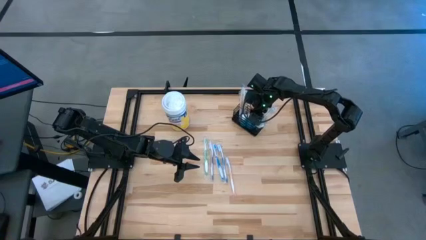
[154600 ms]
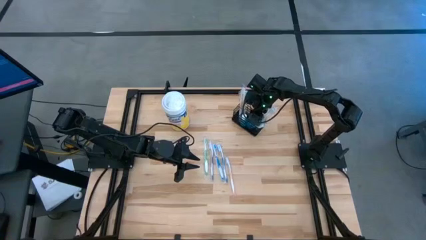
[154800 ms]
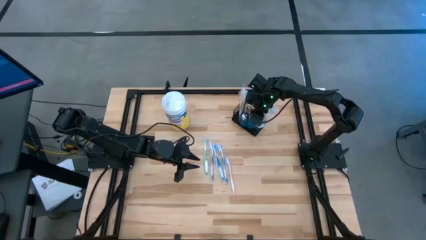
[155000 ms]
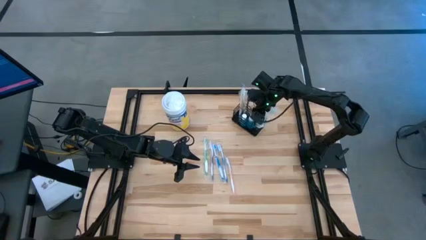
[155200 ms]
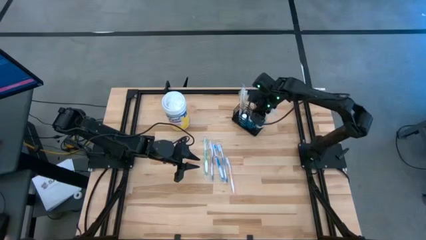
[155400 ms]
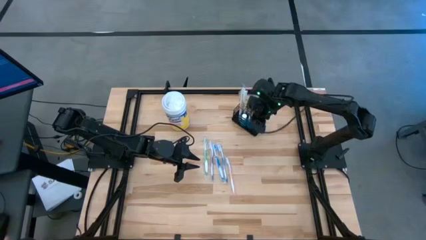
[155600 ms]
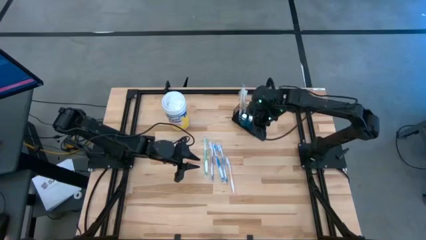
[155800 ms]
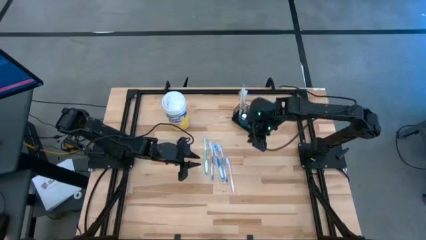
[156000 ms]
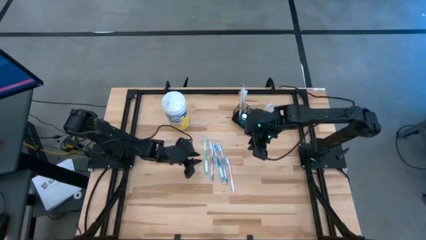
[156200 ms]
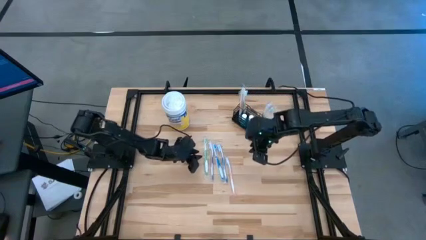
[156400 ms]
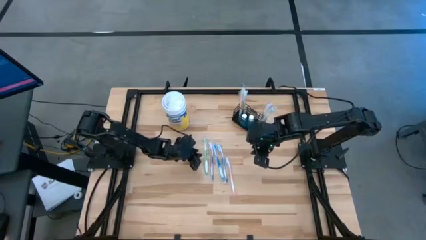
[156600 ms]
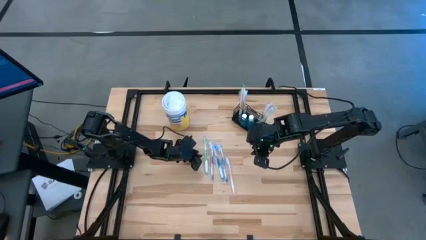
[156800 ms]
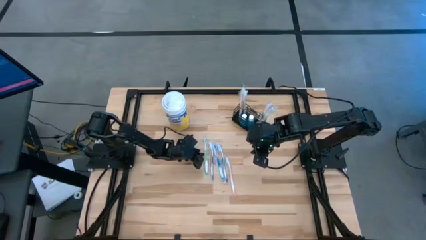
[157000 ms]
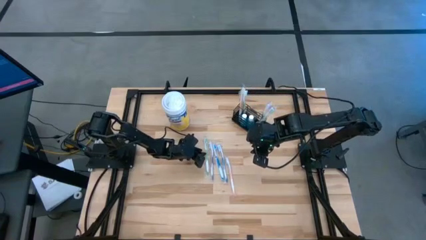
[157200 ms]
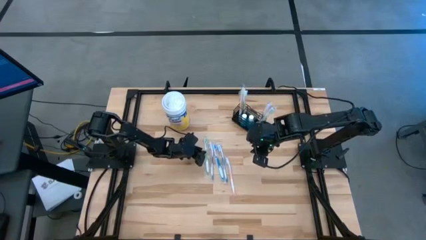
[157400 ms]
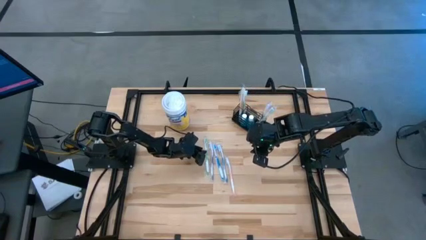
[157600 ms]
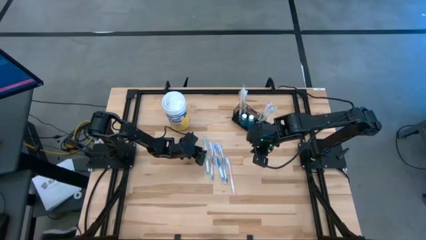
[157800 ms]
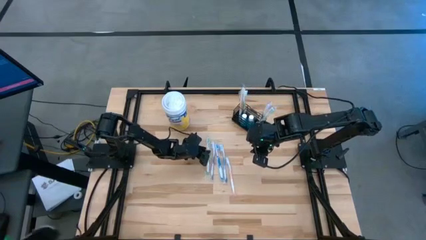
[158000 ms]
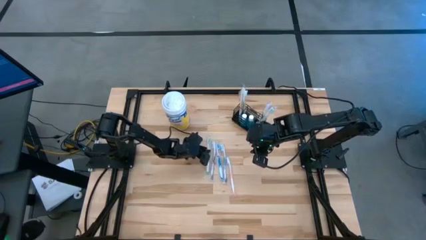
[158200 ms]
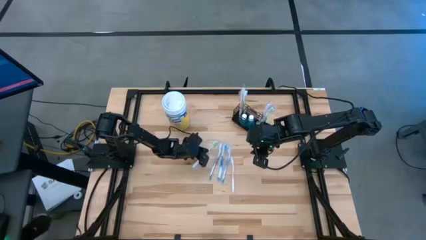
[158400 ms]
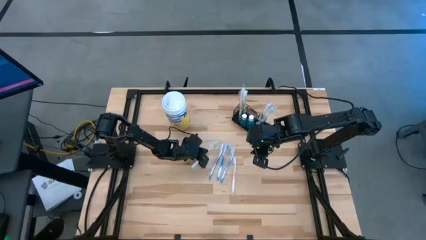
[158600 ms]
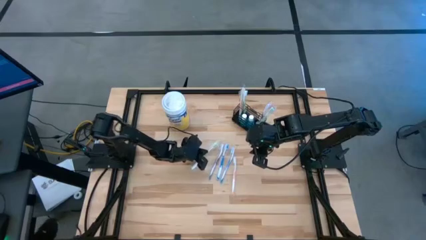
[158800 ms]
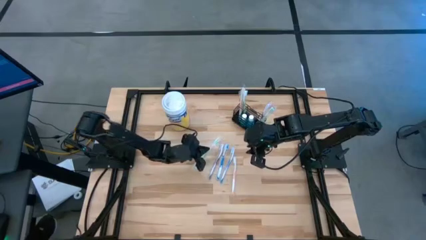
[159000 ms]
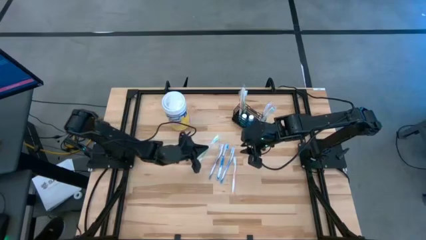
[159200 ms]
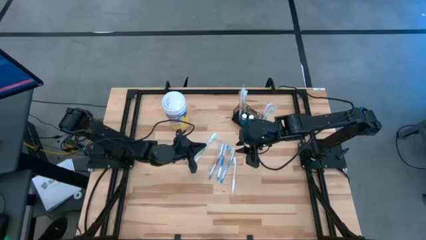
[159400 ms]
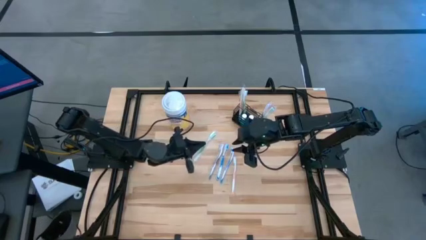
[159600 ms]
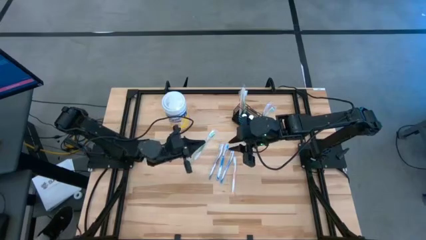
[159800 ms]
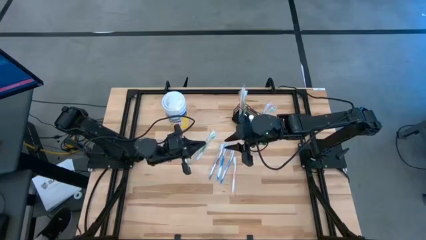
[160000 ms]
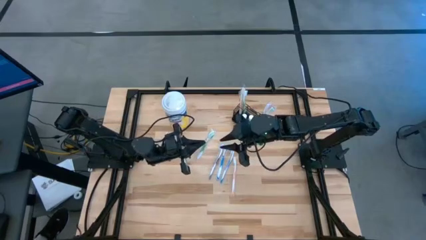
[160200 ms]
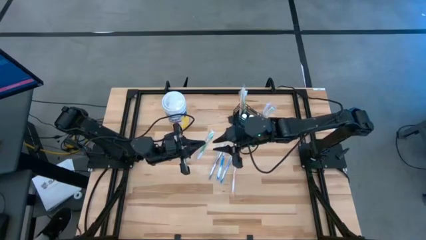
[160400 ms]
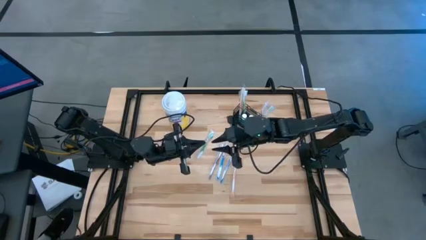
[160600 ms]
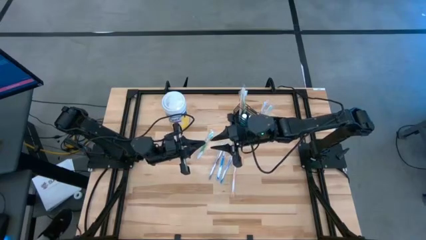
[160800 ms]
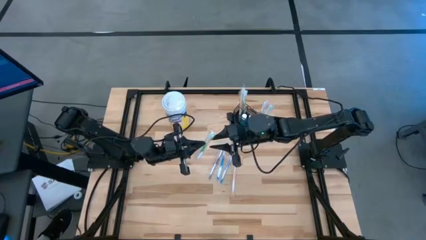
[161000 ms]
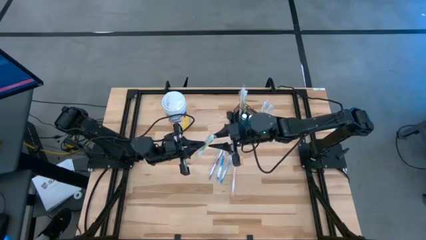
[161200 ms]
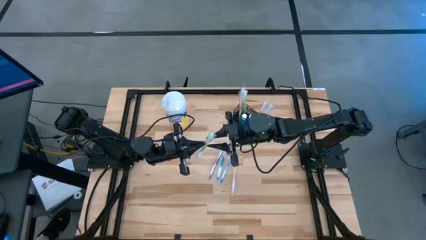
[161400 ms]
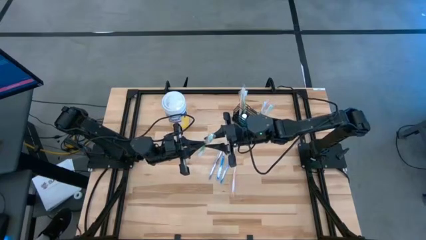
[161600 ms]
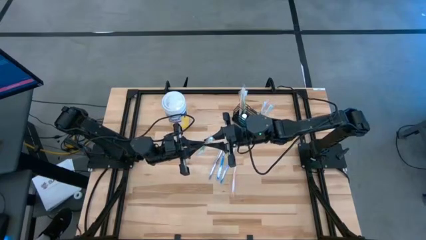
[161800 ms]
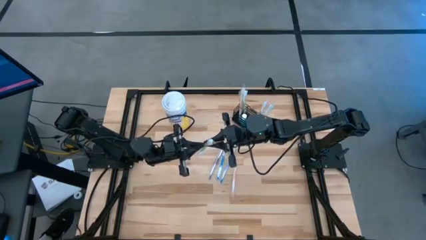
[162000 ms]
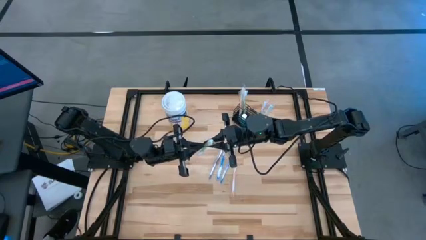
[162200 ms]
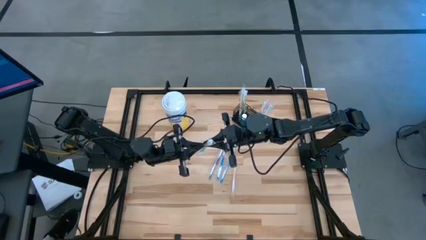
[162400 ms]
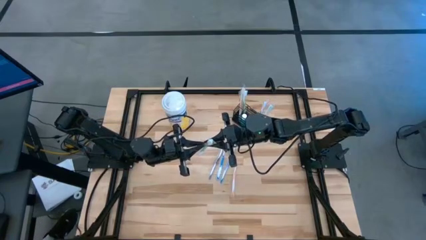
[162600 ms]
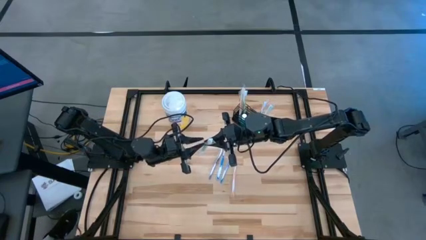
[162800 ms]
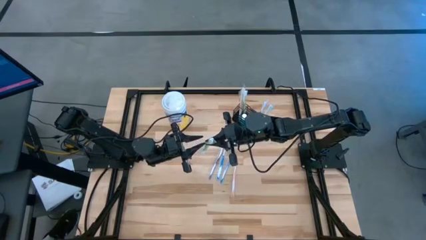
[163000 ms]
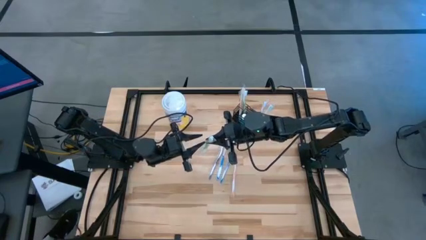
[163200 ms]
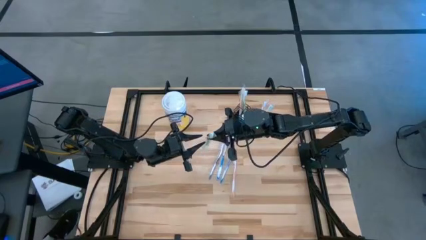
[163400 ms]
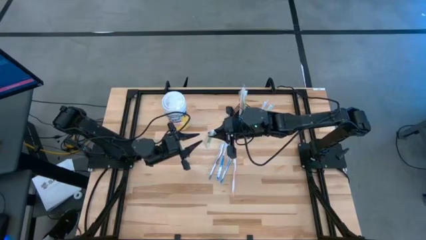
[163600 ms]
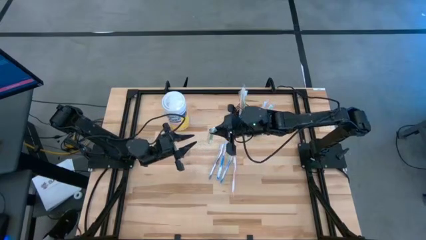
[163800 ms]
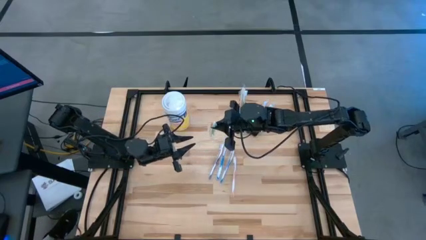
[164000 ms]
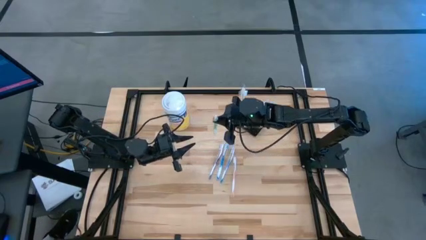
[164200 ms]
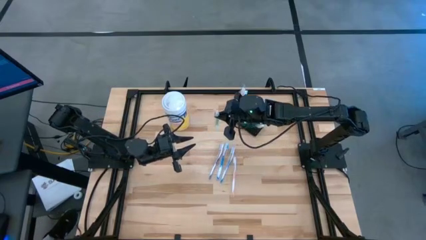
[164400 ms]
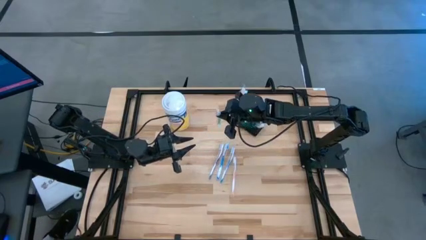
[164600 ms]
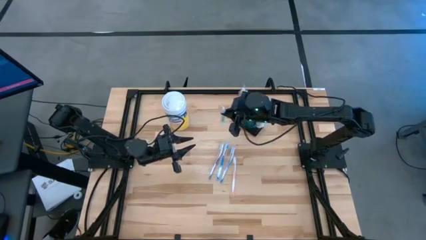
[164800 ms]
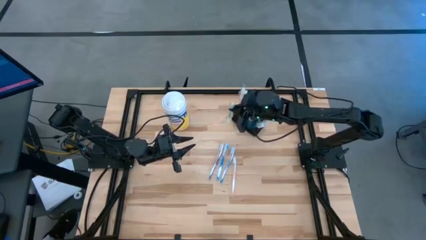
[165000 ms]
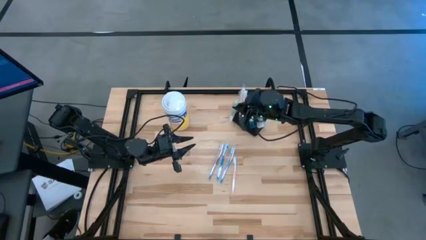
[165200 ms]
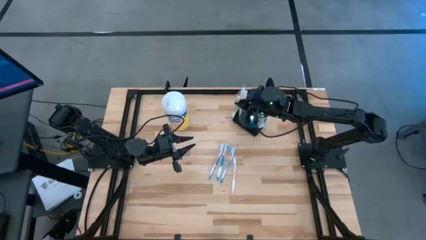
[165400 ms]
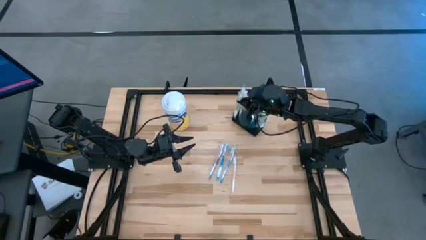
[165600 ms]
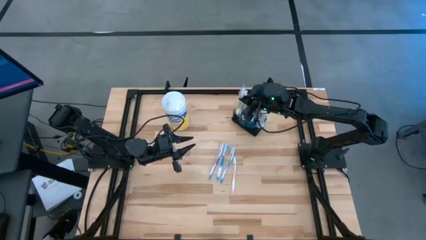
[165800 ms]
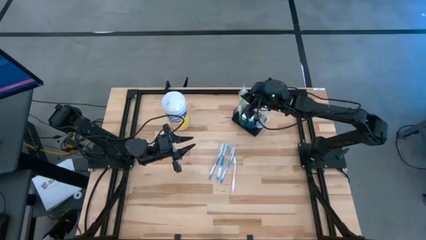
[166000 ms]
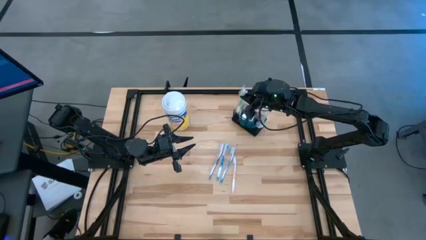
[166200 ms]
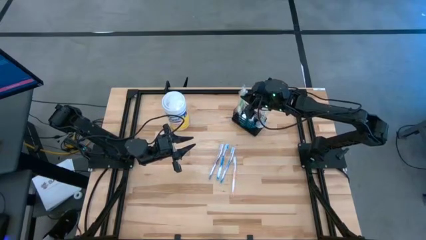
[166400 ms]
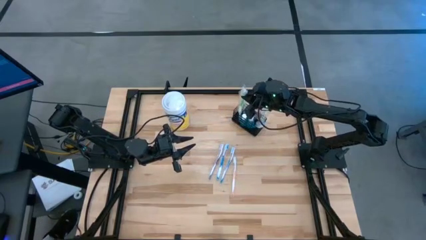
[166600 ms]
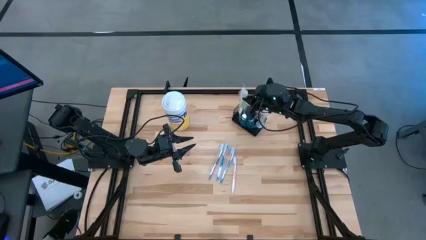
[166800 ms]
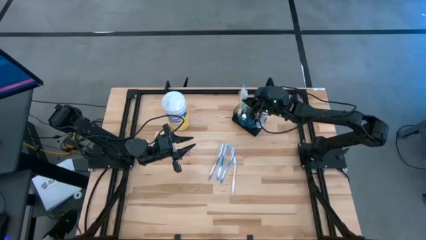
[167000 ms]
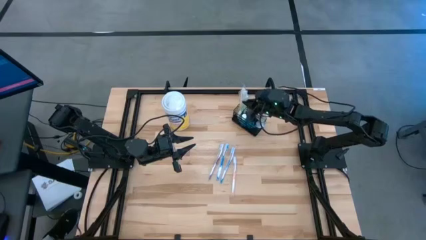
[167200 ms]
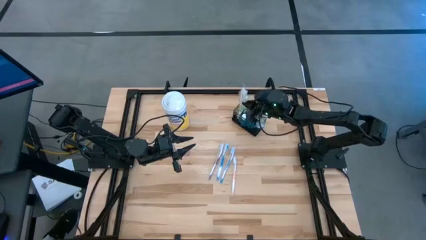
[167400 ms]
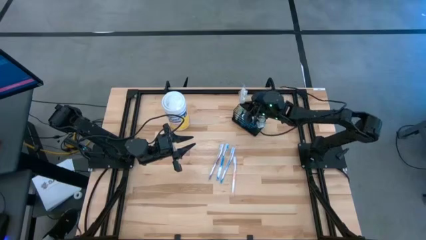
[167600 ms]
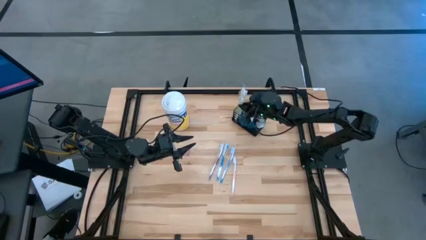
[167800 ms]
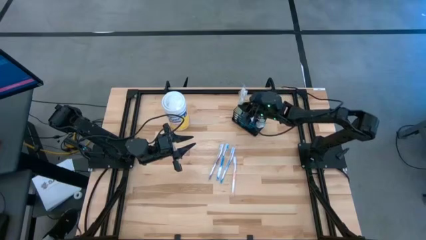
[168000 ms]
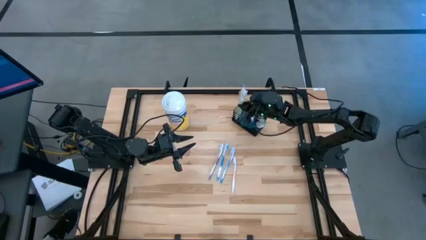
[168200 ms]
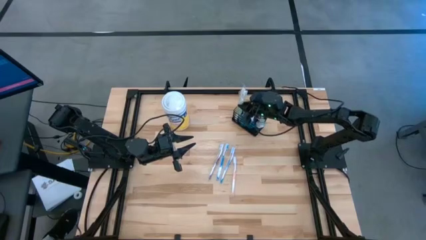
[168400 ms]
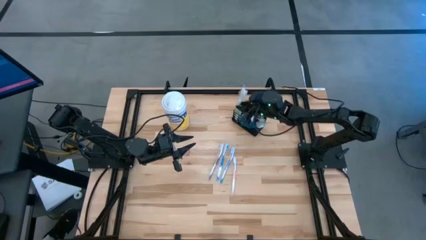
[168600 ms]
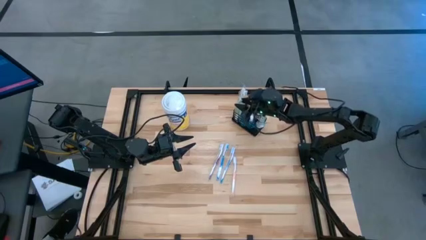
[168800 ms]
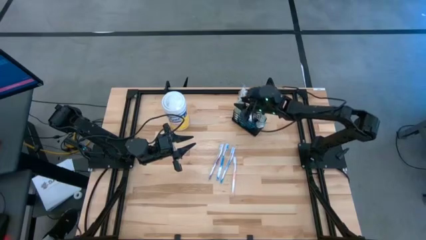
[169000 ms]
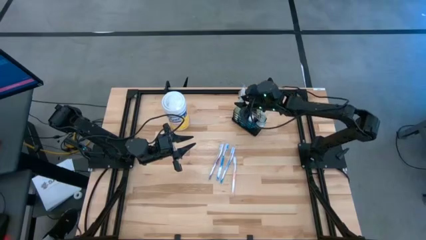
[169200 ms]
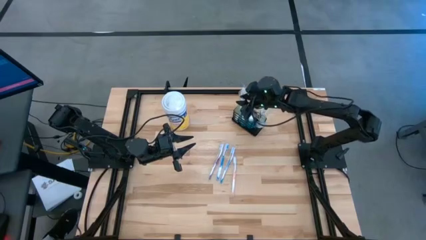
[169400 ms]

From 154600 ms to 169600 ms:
Task: Pick & Place toothbrushing station
Put the green toothbrush into the black wire organizer

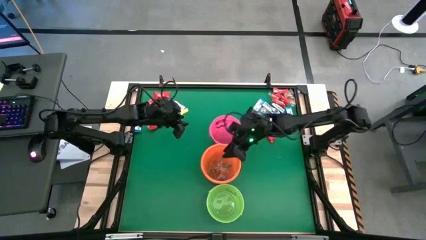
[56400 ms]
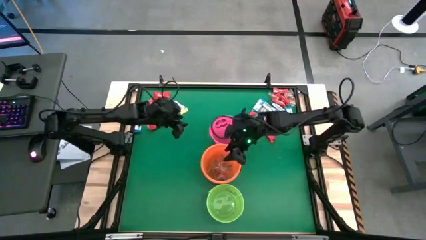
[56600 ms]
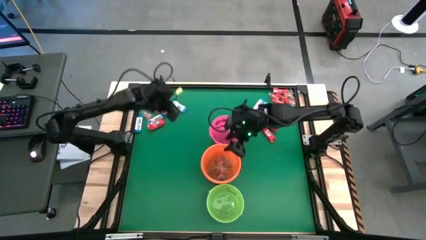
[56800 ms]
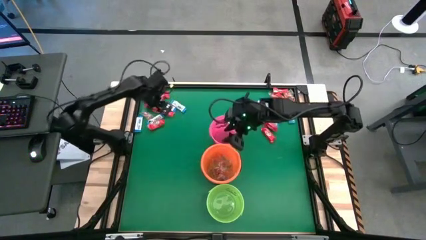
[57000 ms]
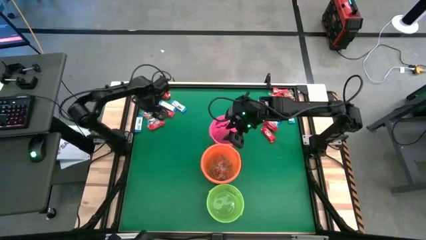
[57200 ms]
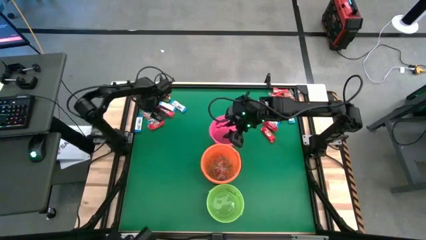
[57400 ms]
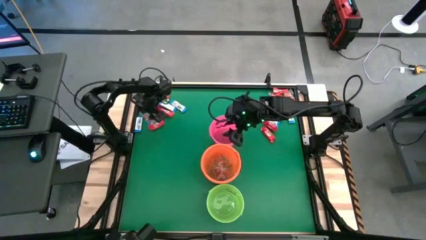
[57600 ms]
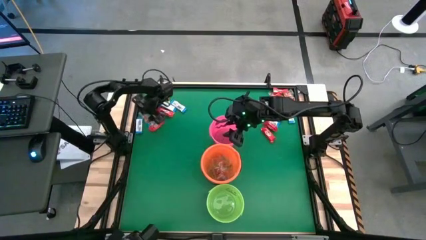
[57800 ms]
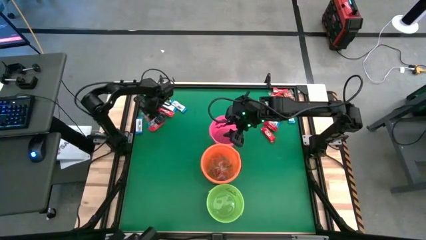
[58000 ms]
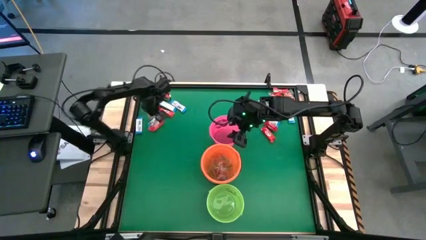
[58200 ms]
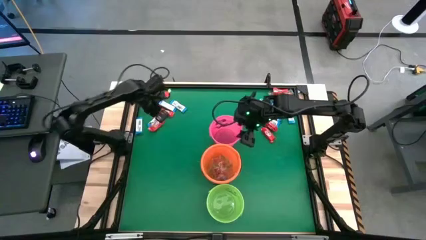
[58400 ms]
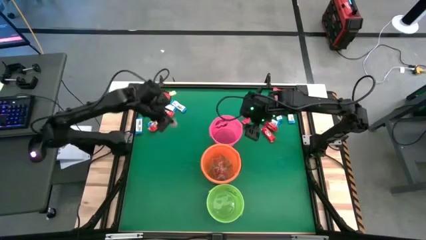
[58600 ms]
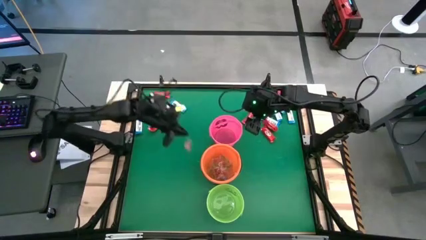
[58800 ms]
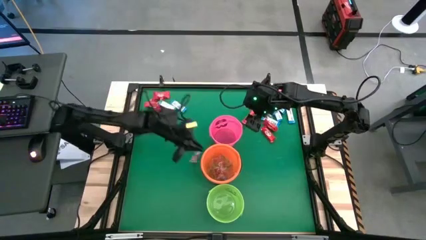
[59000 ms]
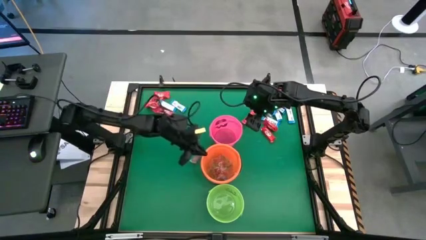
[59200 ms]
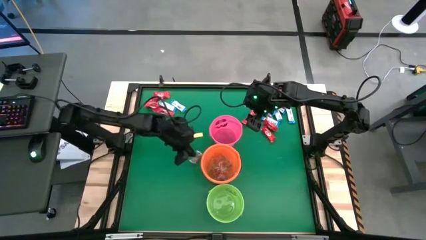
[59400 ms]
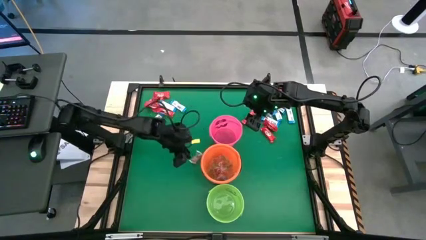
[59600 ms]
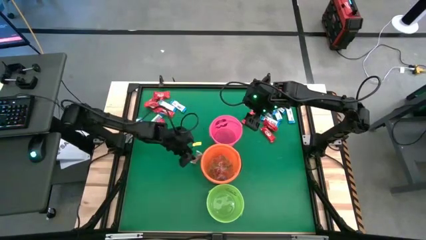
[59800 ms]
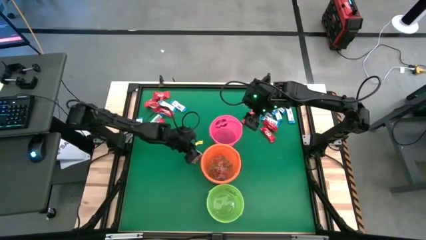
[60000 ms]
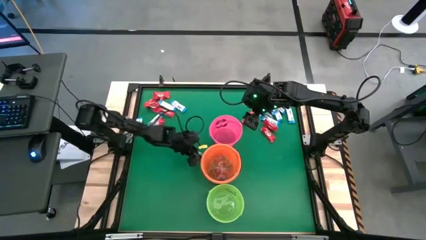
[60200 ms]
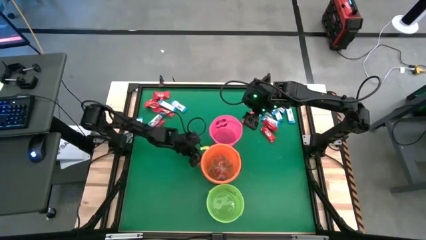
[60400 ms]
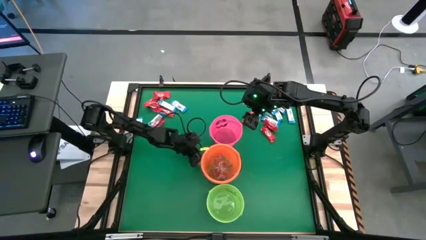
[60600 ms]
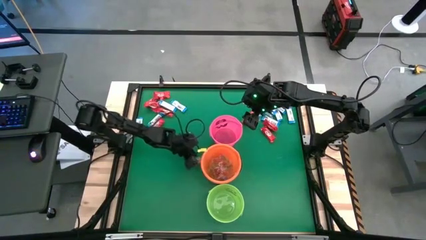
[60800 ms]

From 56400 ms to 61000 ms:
Task: Sort candy by brand, put in halloween buckets
Put the orange gummy into the orange bucket
